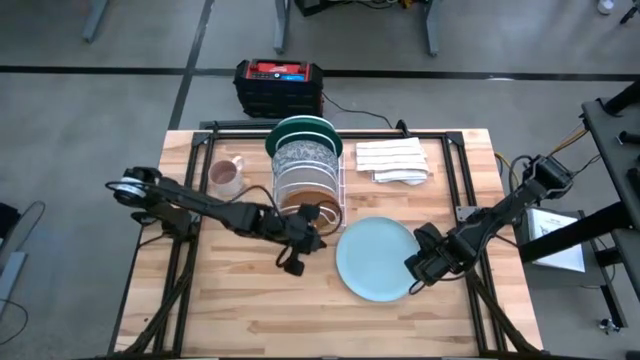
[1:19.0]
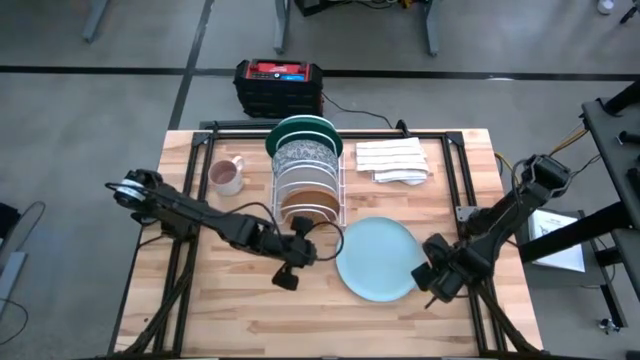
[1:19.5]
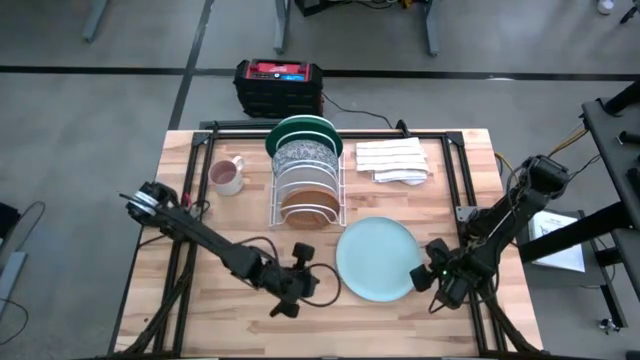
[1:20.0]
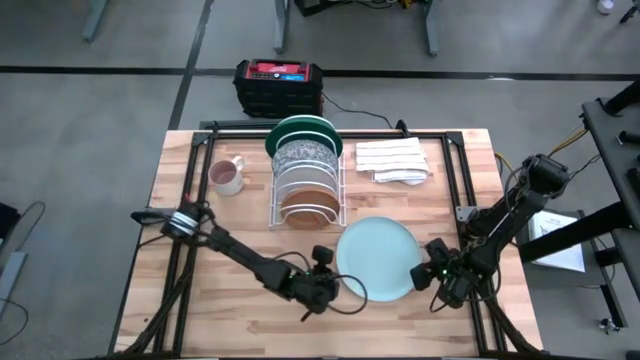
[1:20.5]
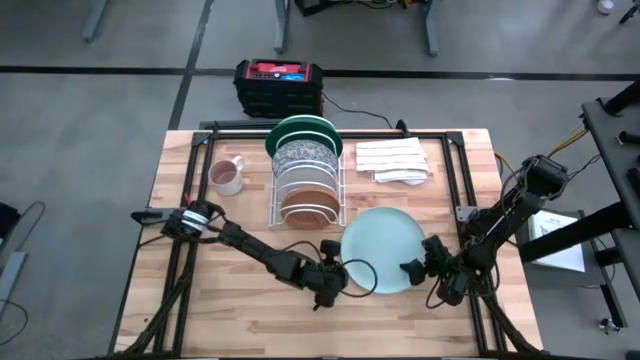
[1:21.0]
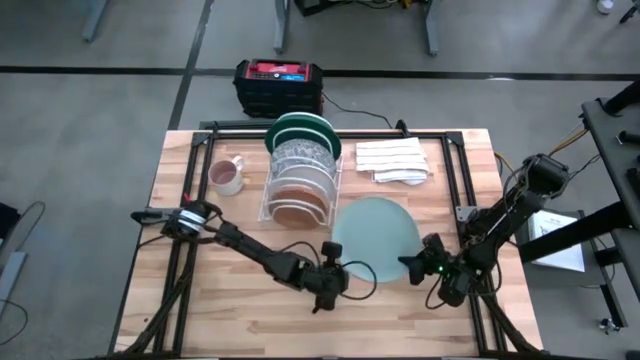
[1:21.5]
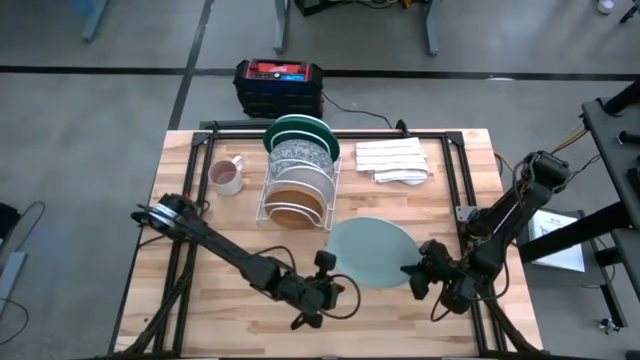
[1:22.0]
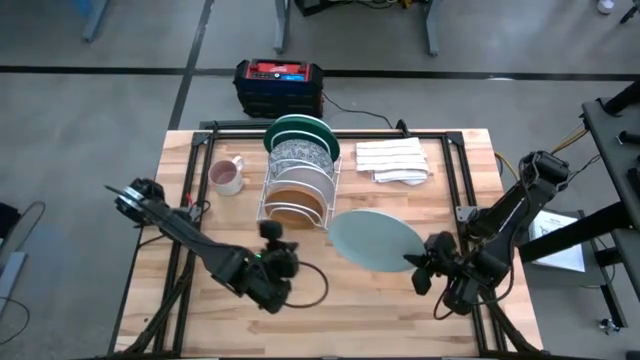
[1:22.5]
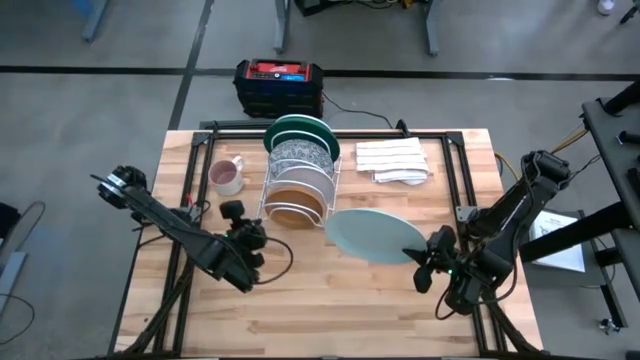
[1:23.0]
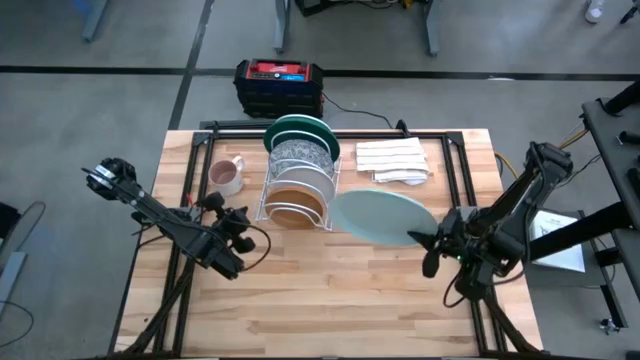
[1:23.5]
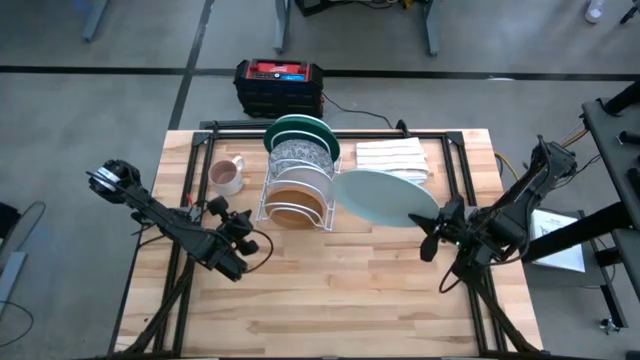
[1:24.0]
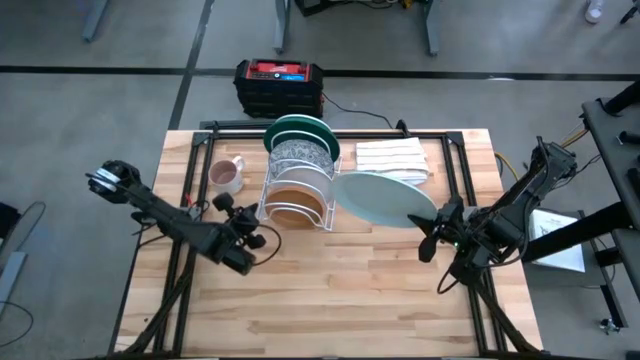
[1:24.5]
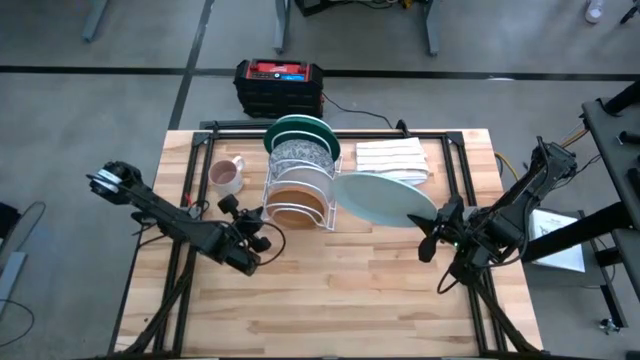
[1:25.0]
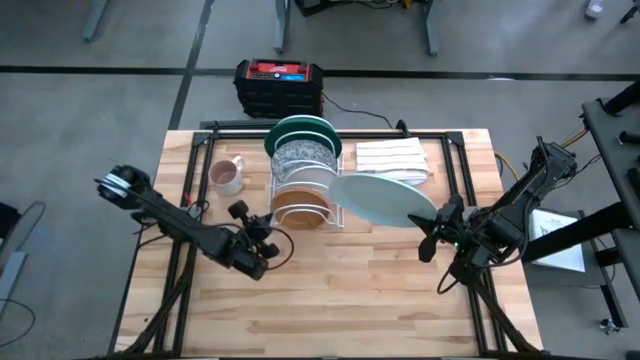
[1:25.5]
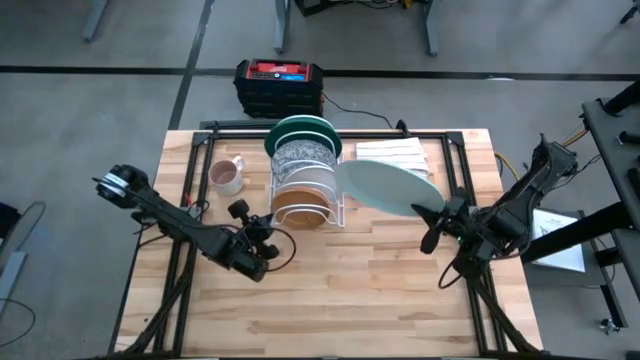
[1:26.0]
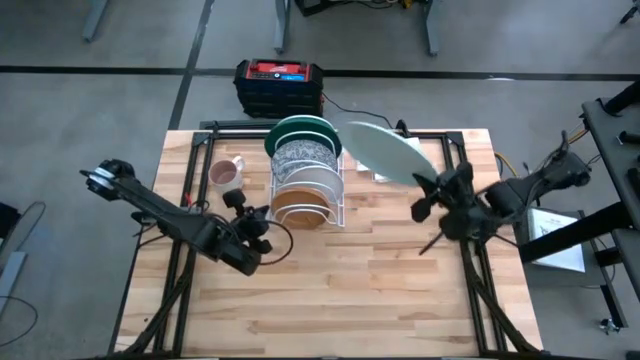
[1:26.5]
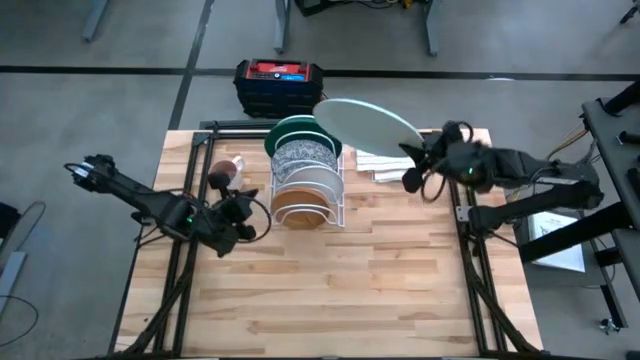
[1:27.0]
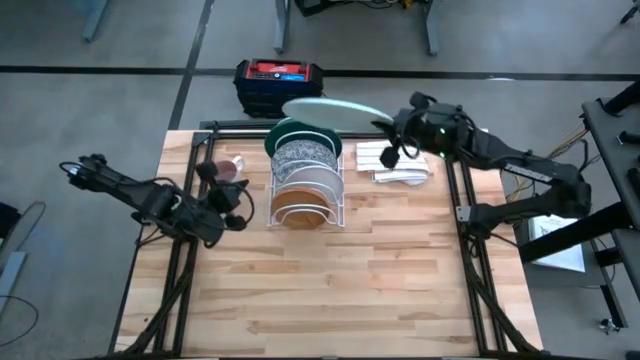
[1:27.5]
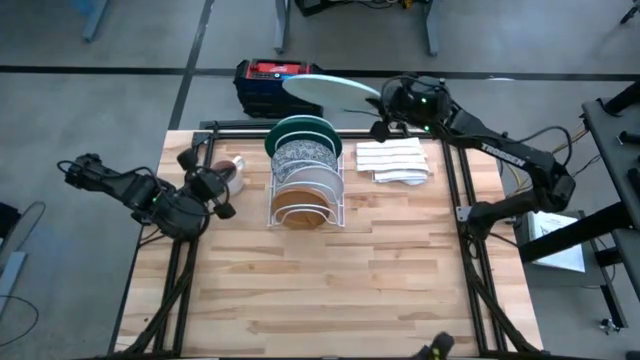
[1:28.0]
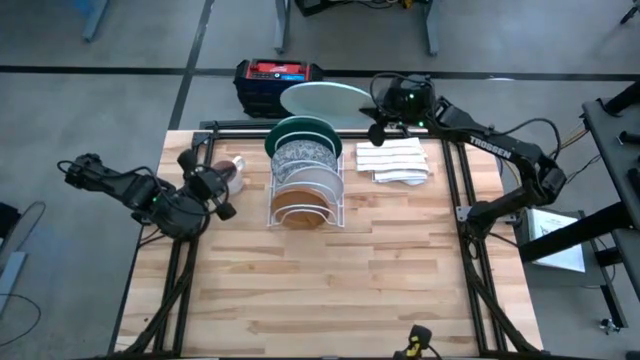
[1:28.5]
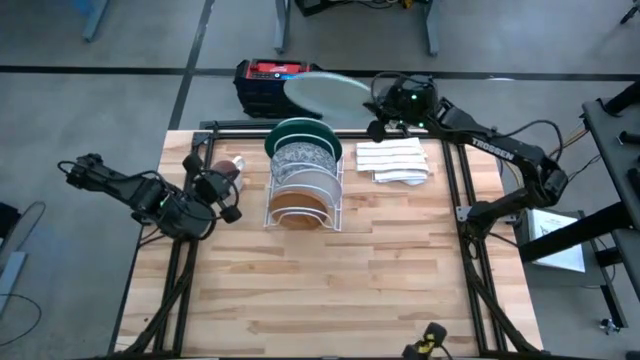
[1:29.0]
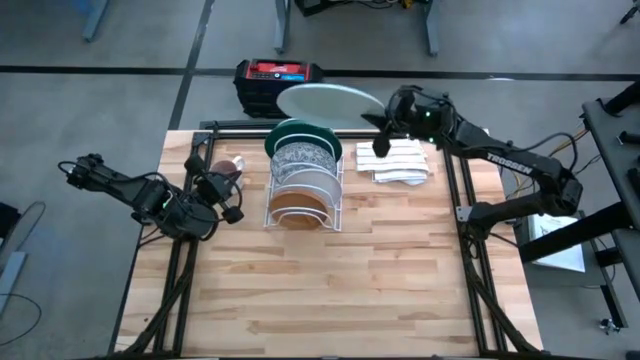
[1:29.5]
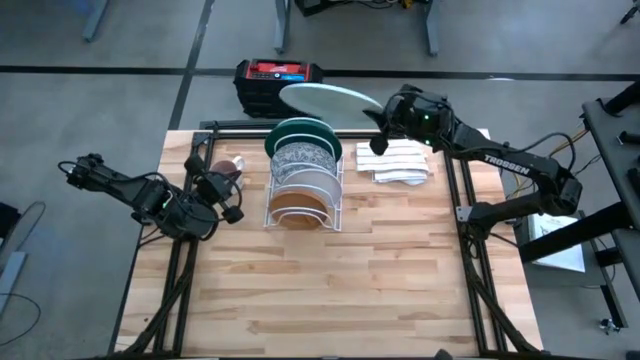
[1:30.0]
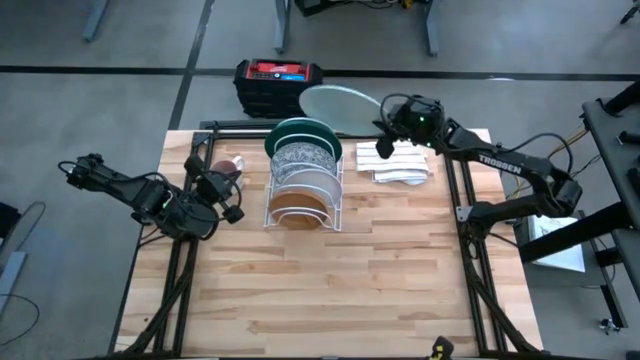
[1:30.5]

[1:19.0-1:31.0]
Task: Sort dishes
Put the light blue plate in the dish rack

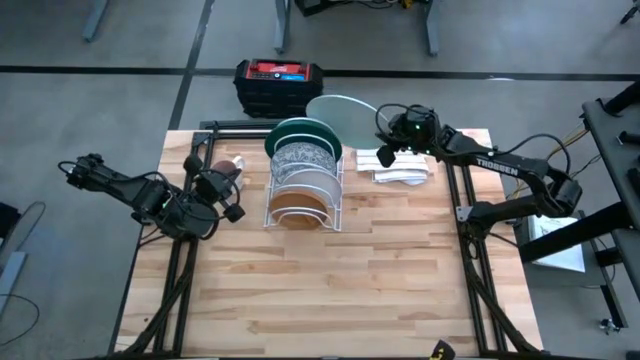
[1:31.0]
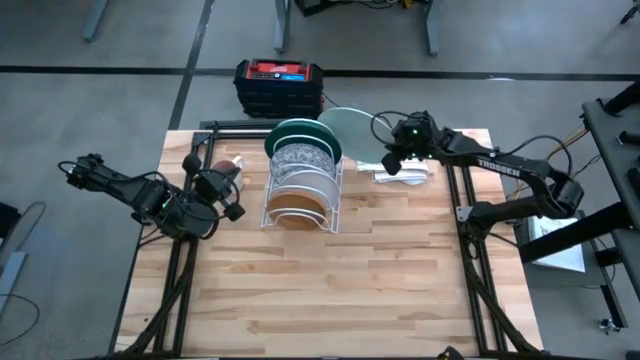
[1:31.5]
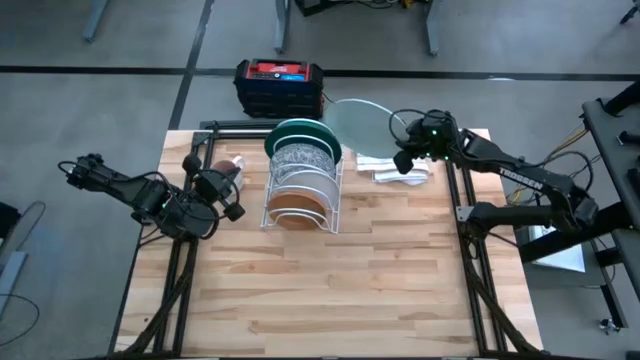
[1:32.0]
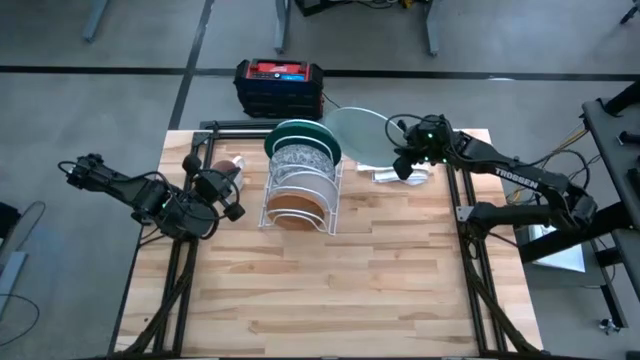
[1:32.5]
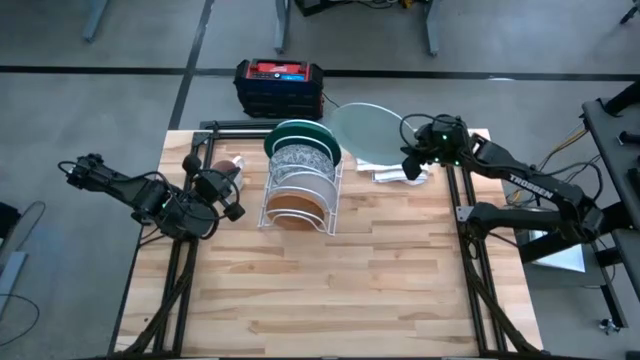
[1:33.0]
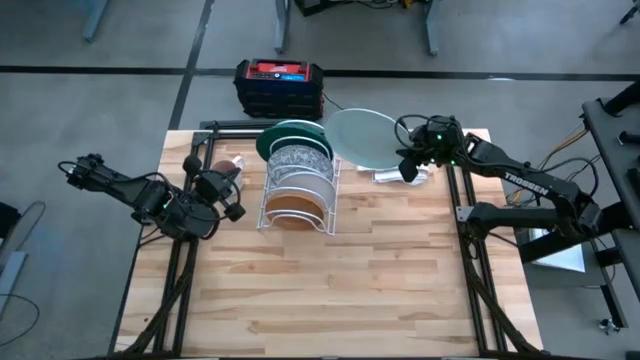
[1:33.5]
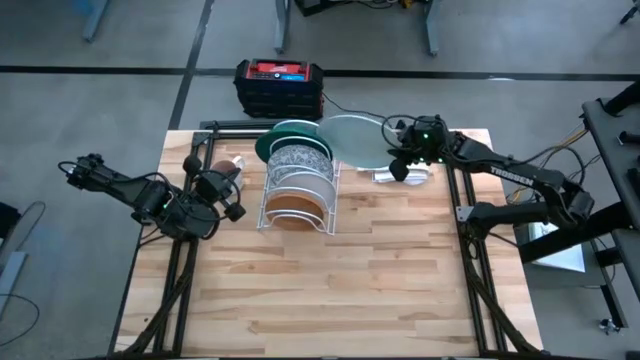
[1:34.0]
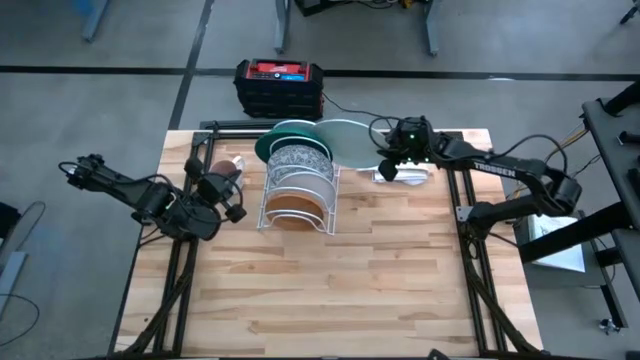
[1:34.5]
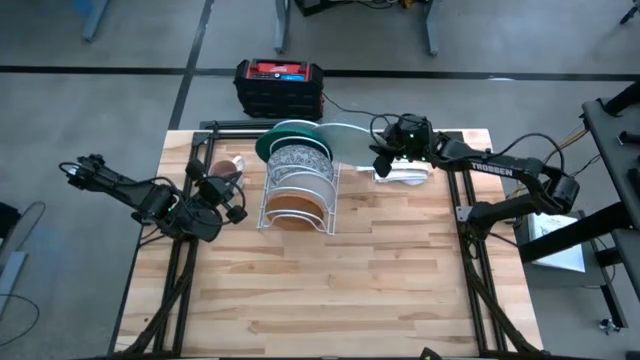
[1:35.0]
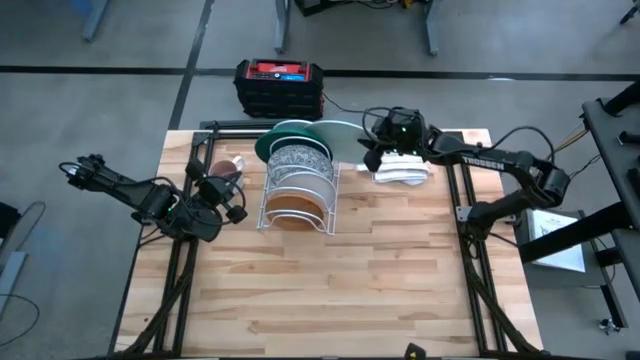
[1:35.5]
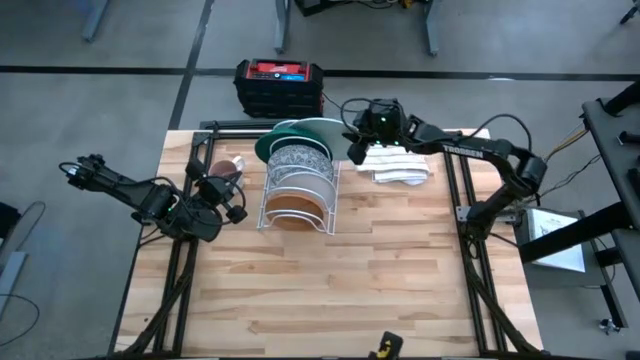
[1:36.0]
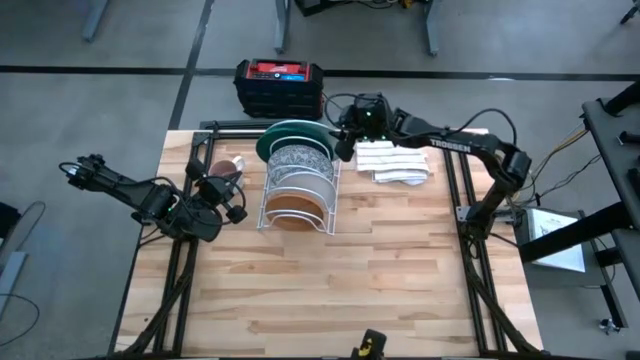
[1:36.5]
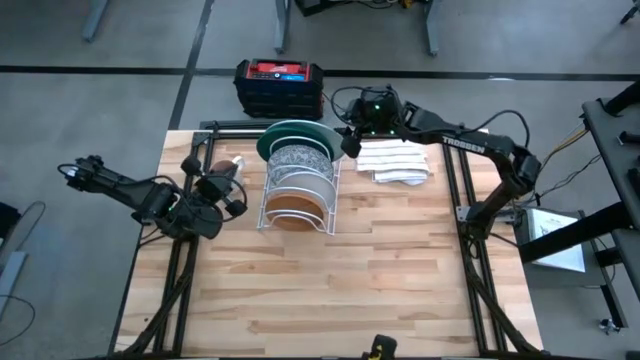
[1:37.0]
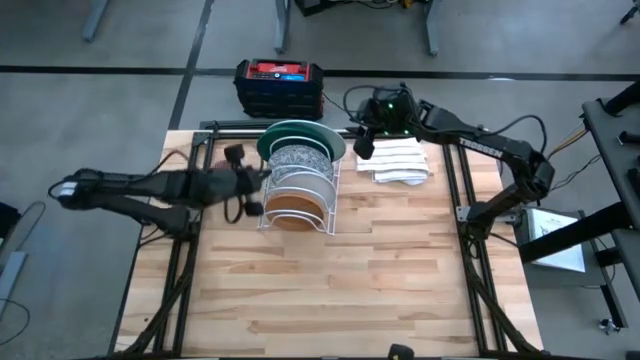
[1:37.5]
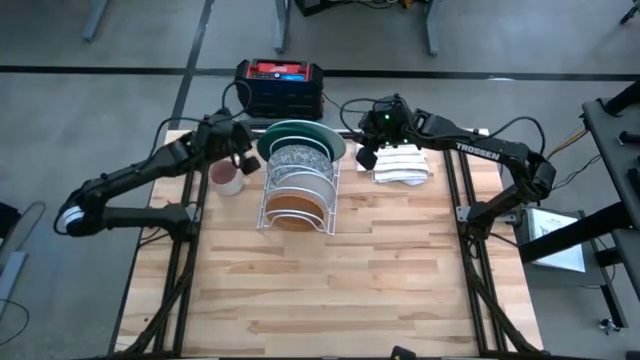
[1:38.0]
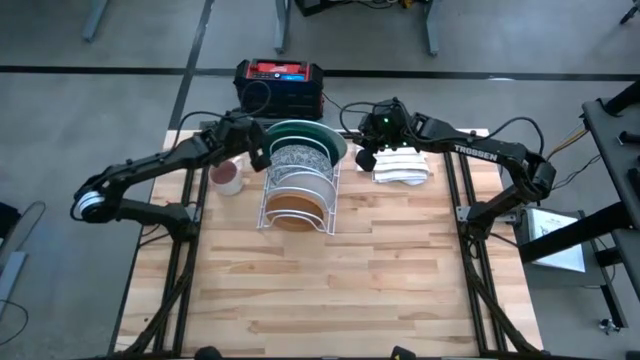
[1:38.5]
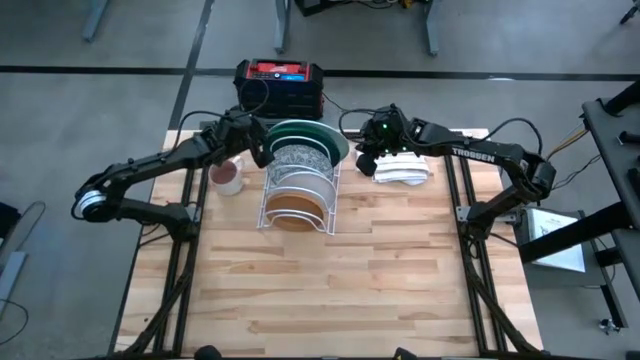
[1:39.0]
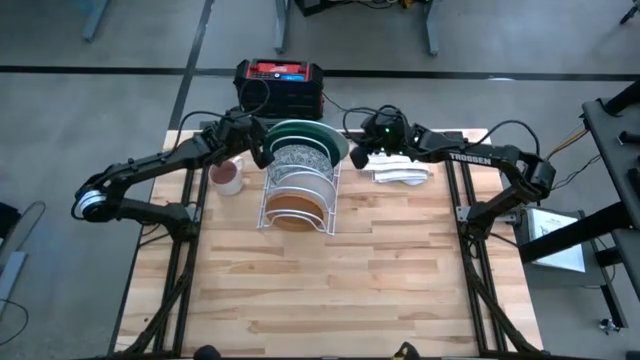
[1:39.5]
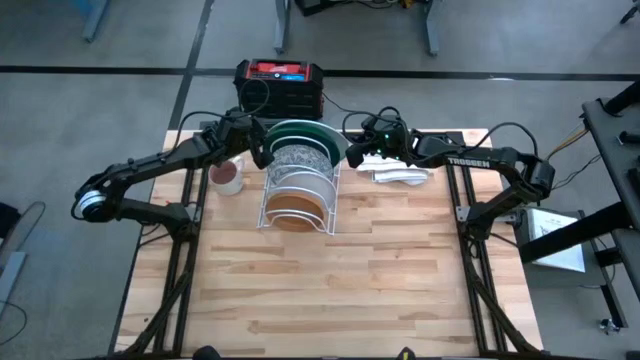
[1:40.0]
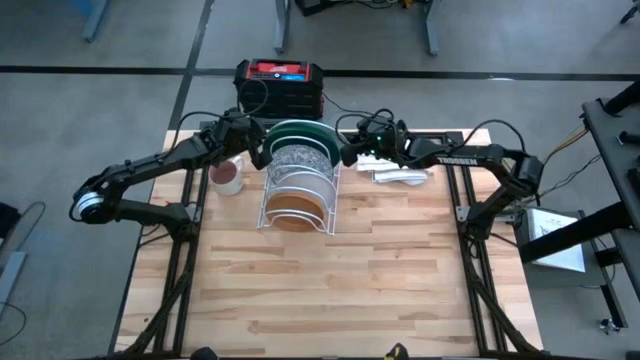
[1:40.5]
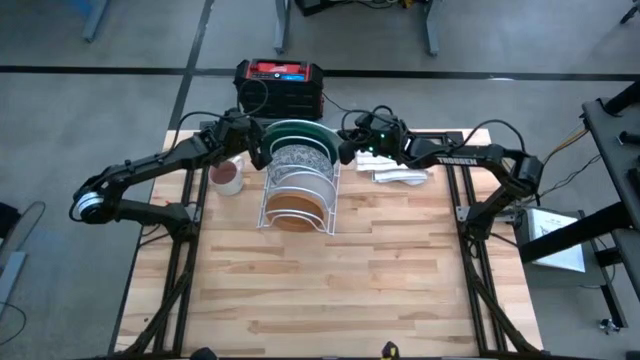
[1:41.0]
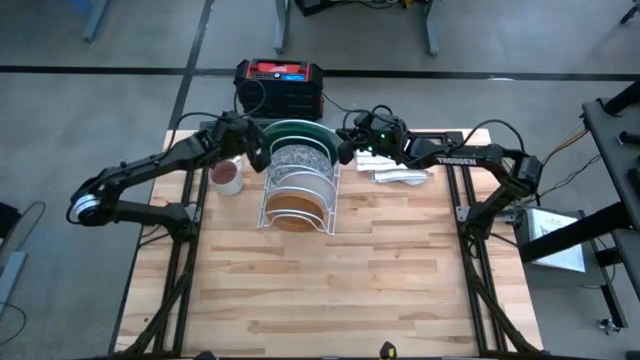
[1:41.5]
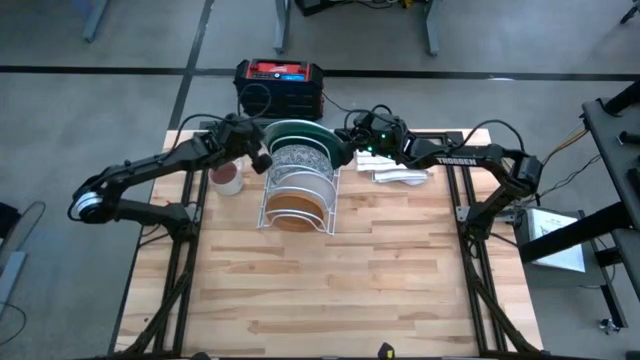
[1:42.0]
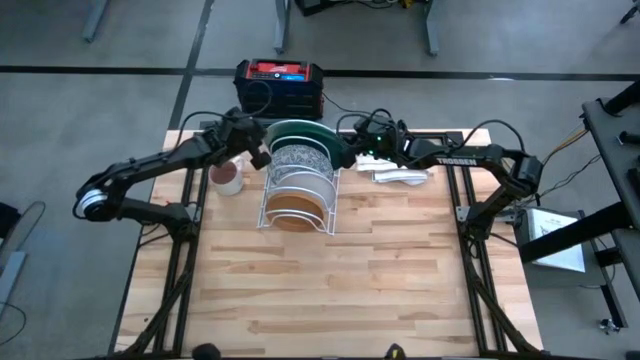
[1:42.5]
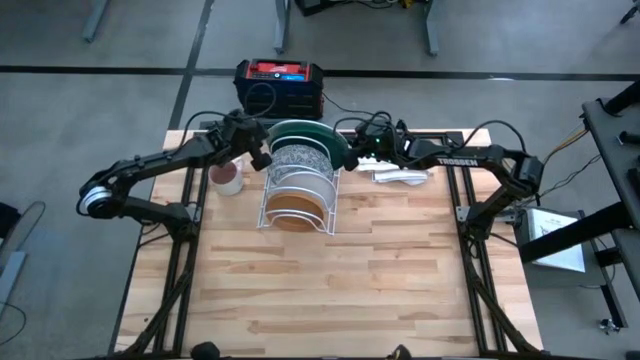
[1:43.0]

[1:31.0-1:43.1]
Put the light blue plate in the dish rack
